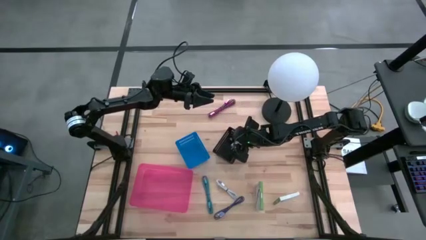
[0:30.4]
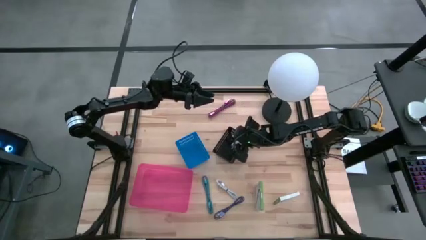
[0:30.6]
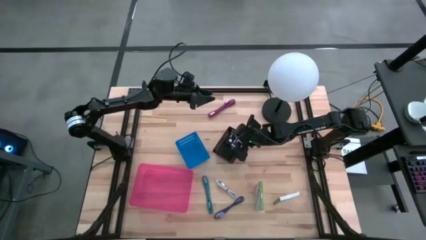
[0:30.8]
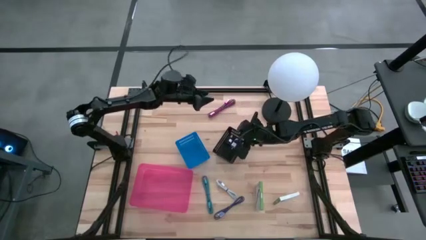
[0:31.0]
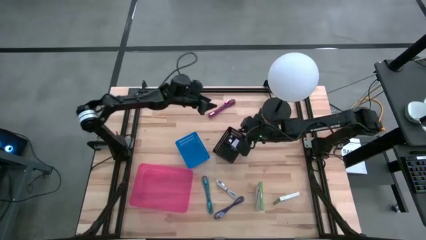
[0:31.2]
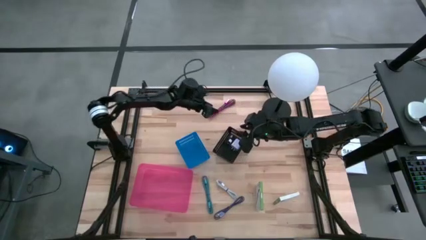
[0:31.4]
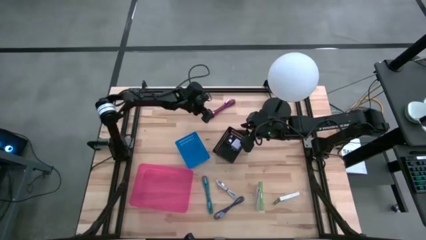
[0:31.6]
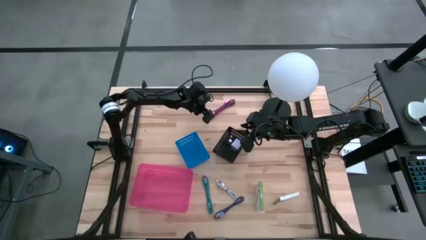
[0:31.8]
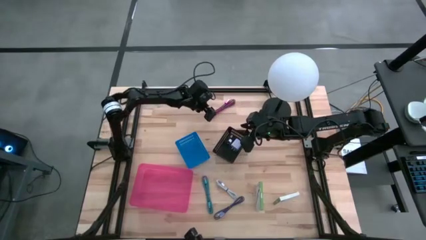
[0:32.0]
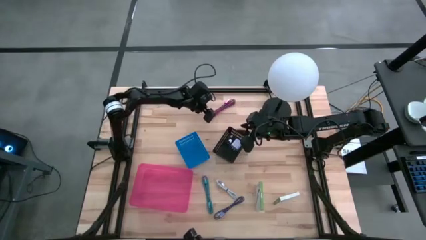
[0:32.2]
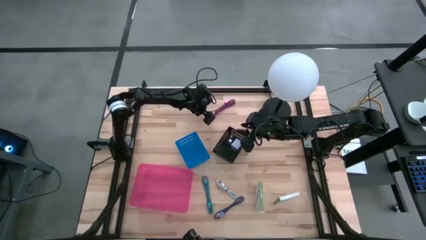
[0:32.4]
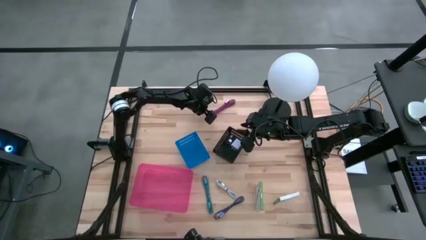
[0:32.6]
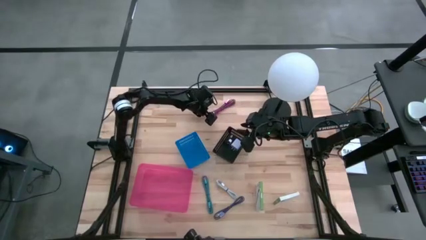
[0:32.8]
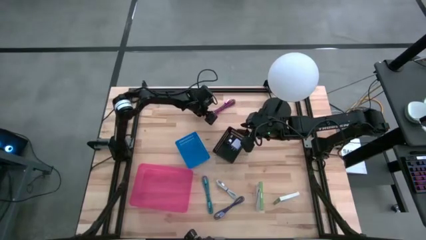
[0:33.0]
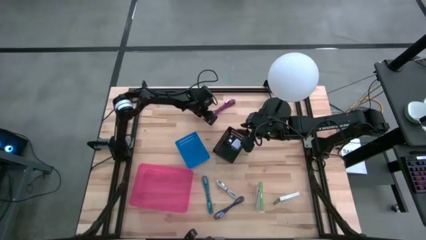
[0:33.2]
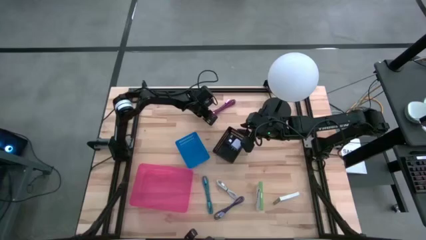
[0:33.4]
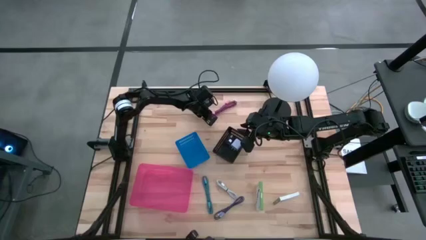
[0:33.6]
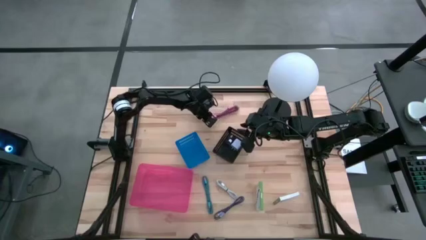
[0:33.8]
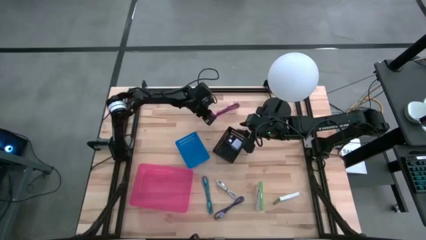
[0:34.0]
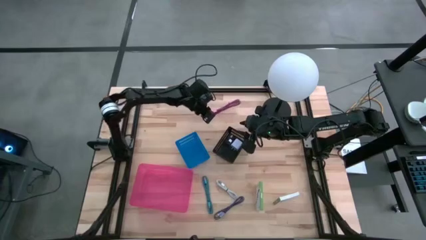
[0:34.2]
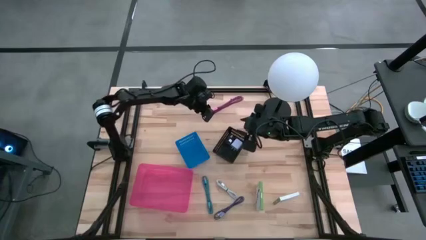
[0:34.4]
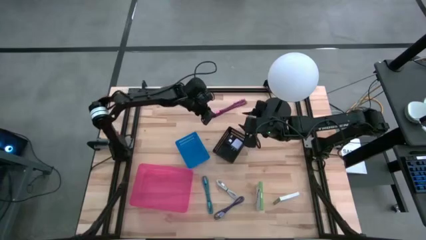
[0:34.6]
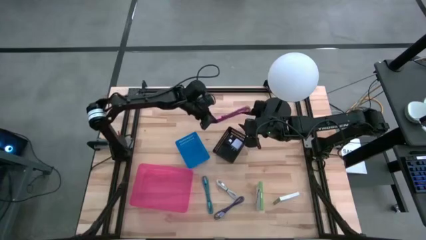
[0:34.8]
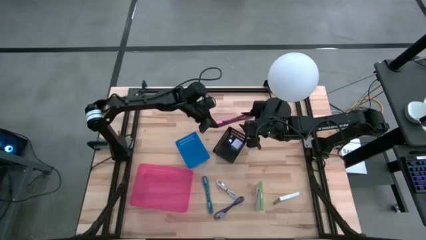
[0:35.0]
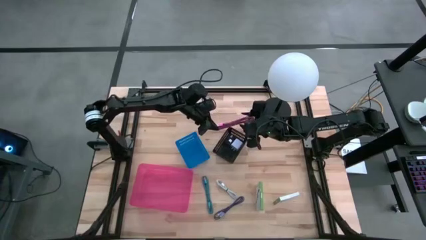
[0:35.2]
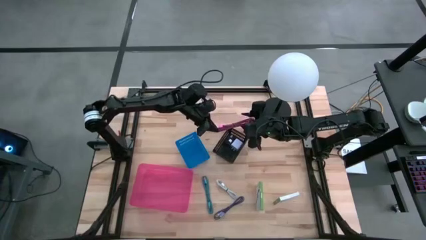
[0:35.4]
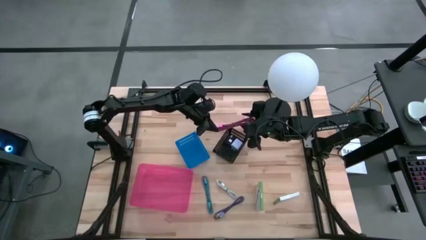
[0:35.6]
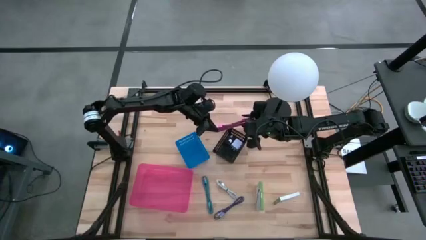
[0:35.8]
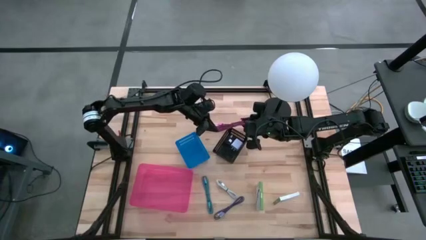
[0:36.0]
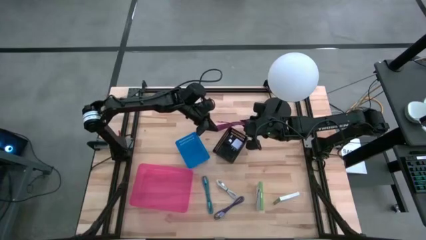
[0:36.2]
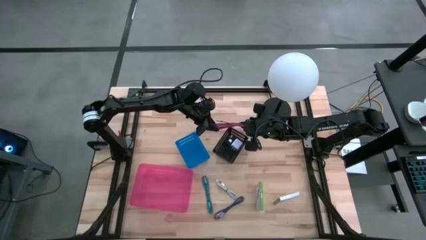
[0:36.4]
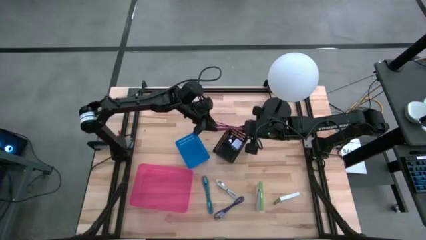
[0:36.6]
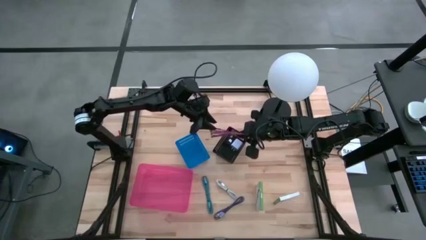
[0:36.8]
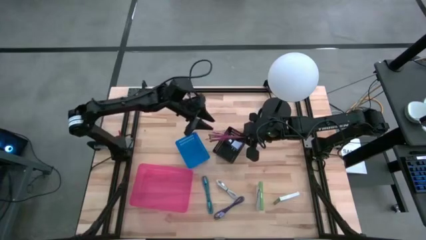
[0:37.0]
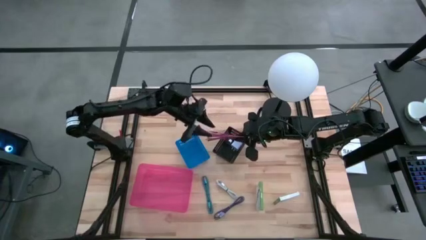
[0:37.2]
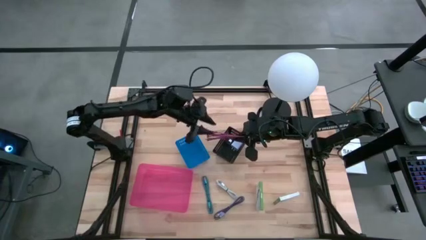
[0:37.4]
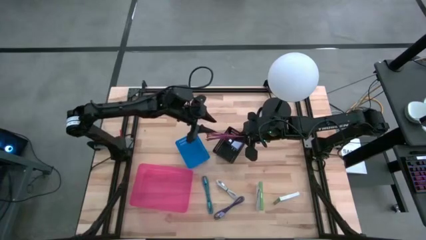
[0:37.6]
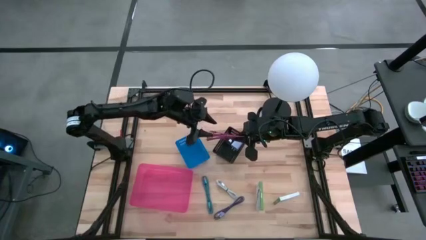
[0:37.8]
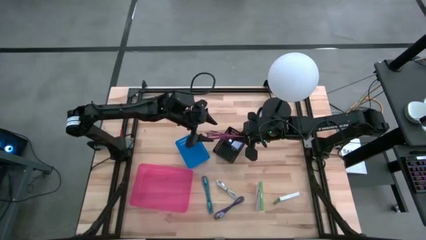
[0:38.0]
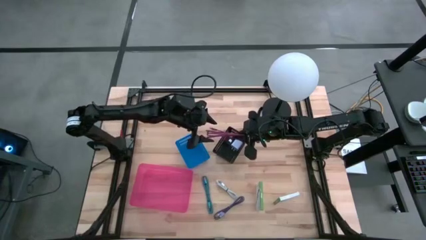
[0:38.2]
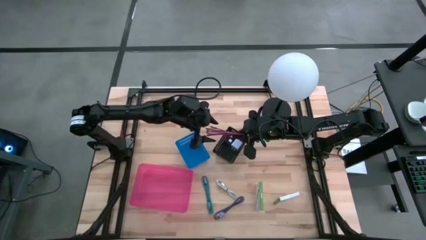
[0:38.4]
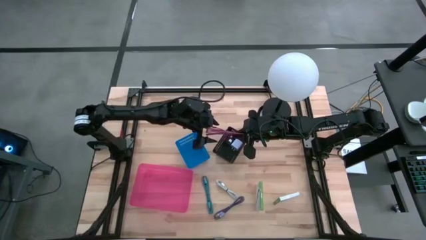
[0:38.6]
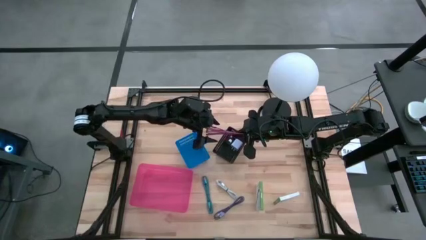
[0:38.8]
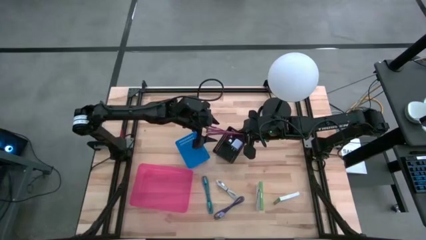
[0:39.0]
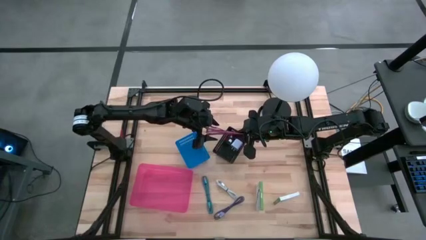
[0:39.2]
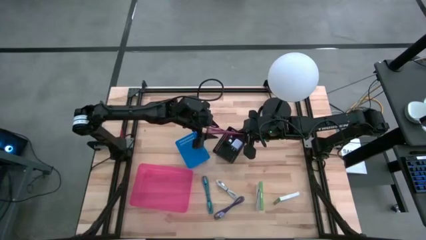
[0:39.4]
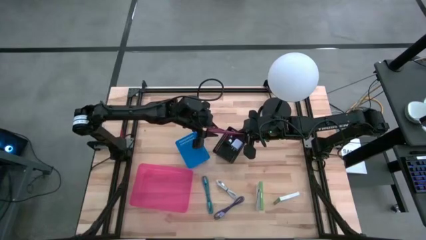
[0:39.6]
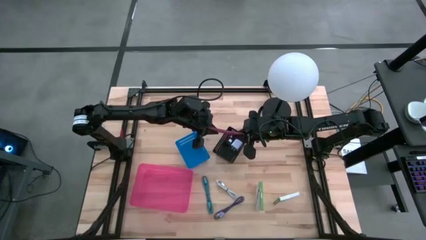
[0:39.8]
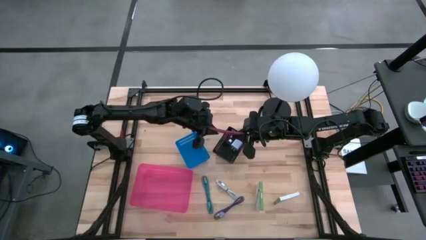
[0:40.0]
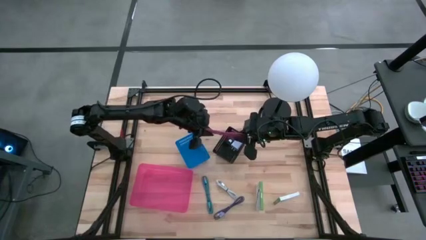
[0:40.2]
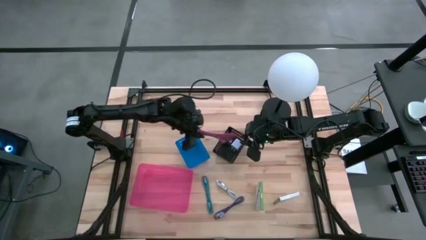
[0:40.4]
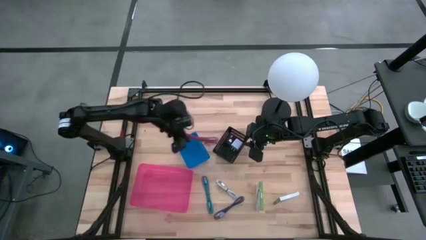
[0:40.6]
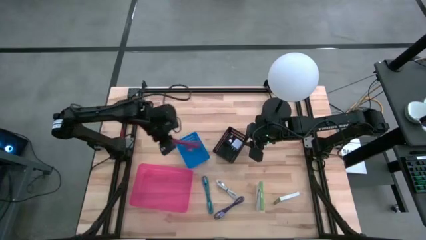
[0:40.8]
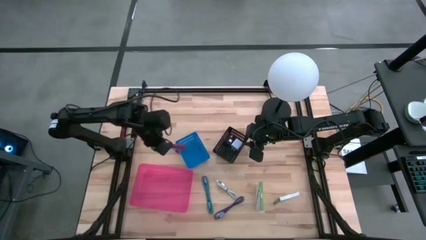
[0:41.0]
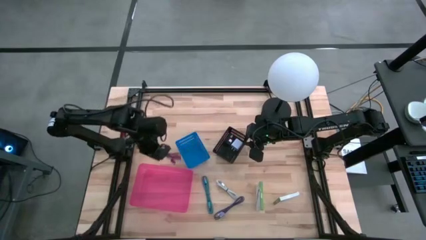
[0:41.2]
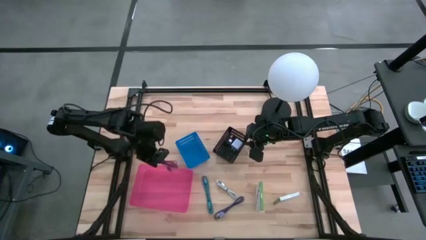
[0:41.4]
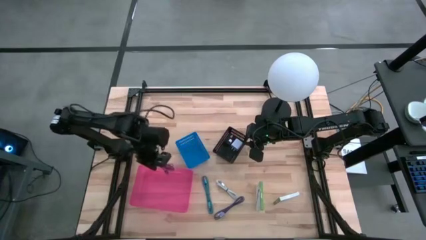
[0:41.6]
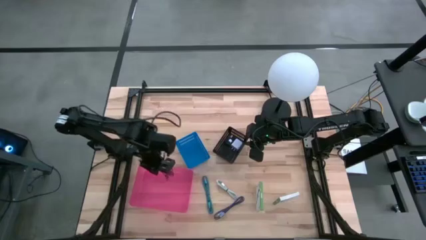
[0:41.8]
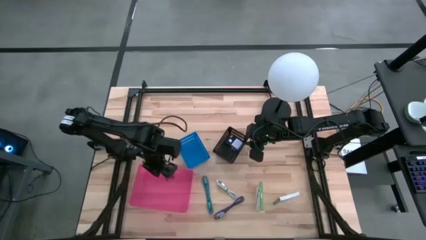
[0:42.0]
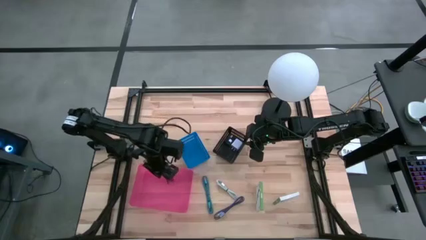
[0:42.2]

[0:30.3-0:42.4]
Task: Pick and place items into bin
Put the black and pink charger cable into the pink bin
